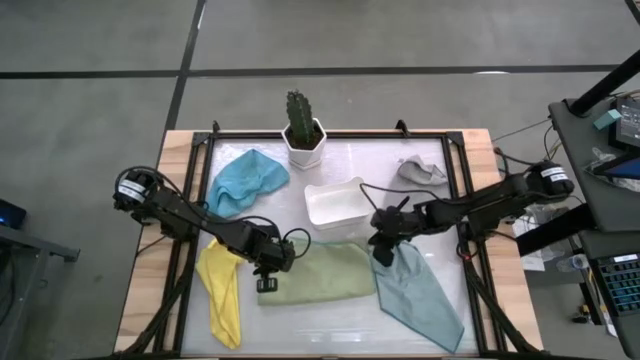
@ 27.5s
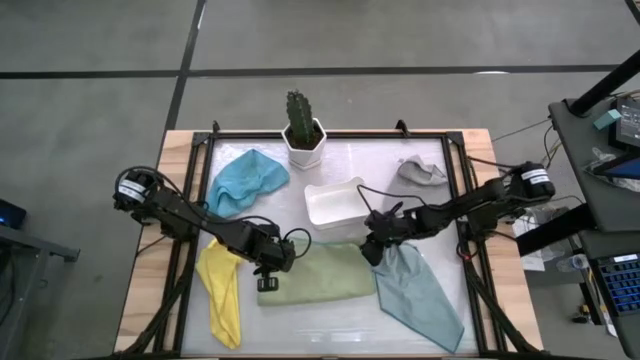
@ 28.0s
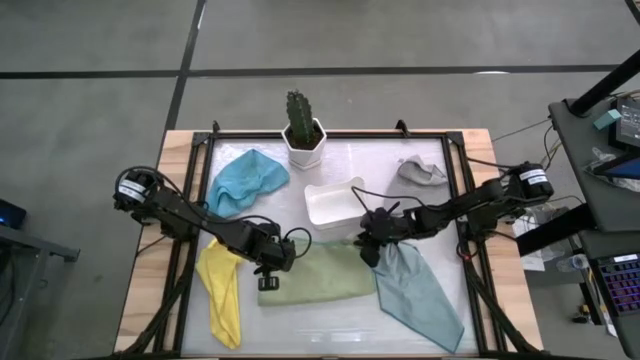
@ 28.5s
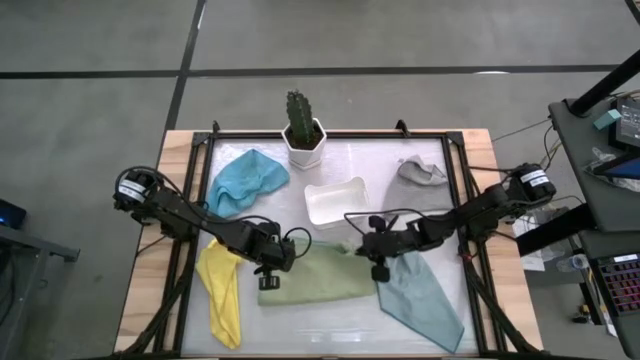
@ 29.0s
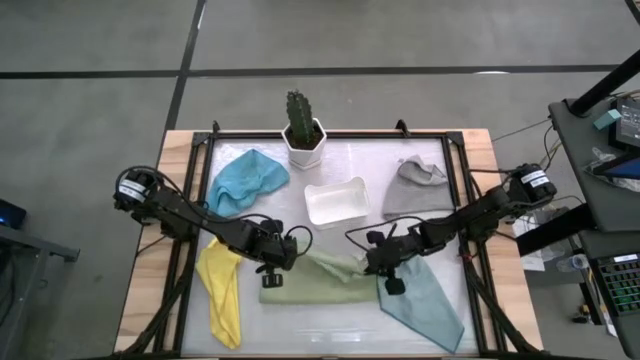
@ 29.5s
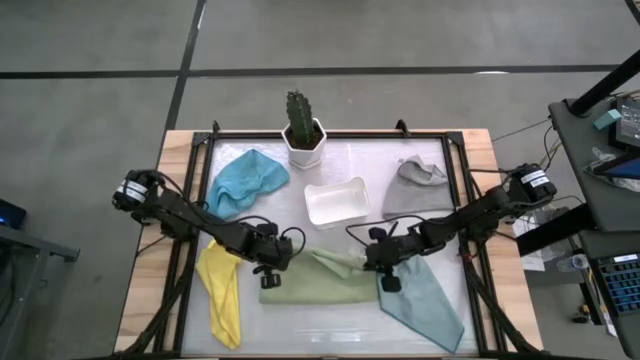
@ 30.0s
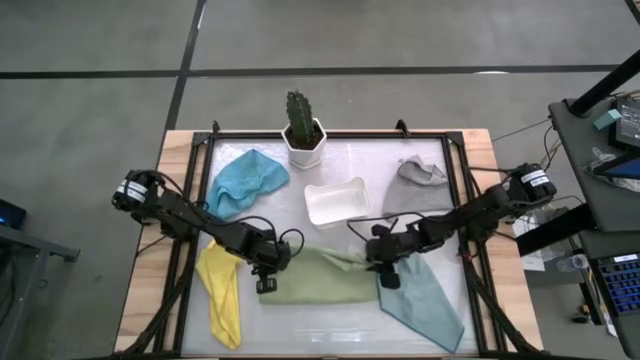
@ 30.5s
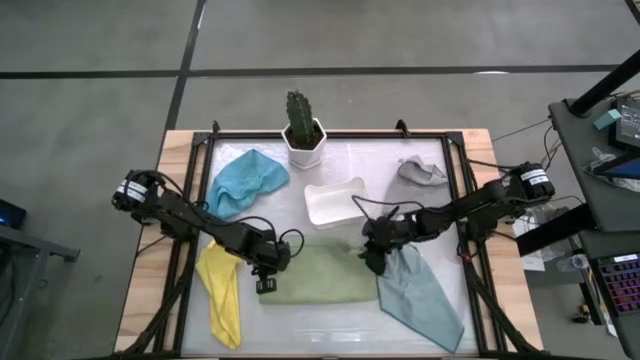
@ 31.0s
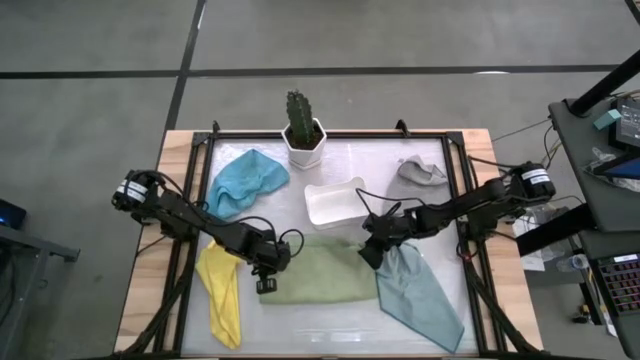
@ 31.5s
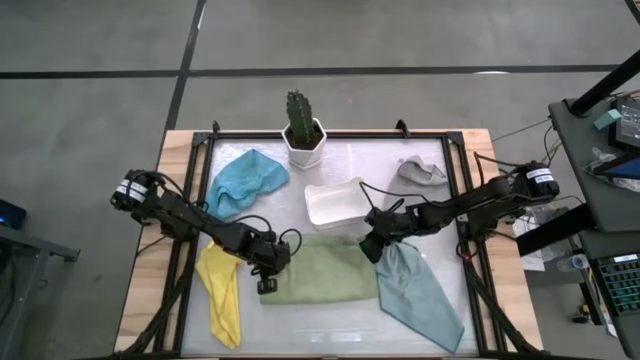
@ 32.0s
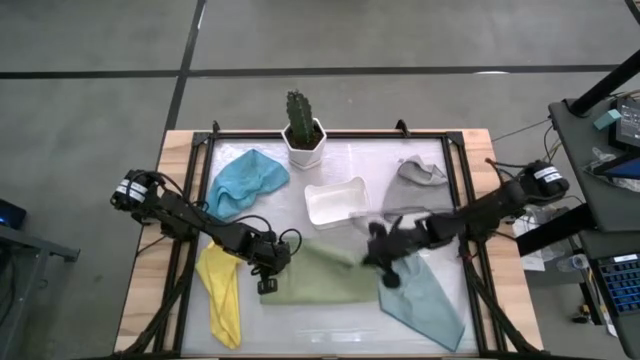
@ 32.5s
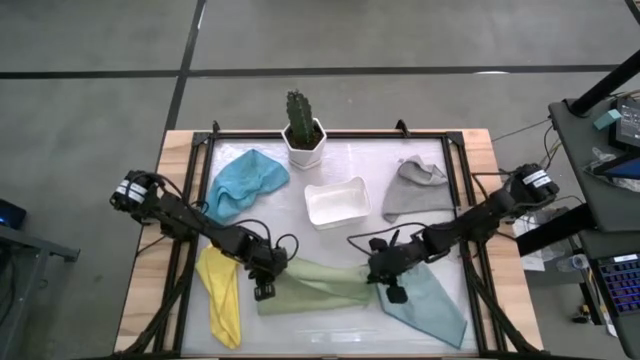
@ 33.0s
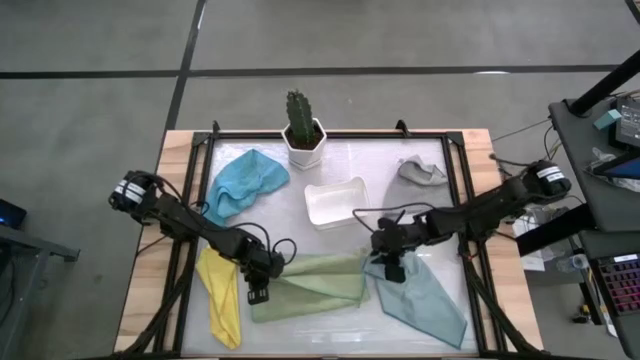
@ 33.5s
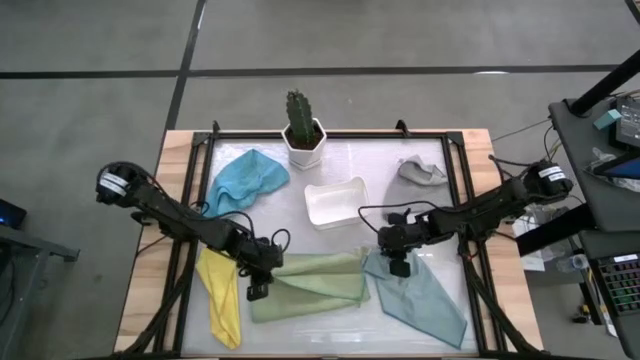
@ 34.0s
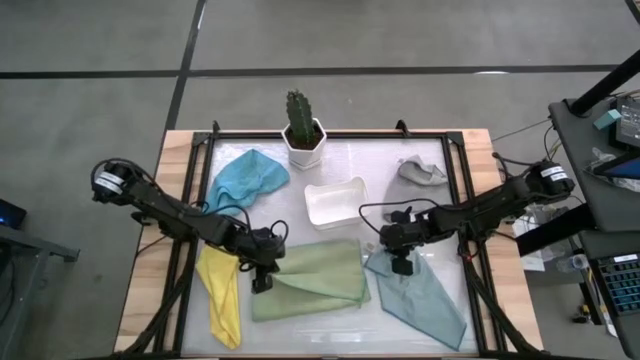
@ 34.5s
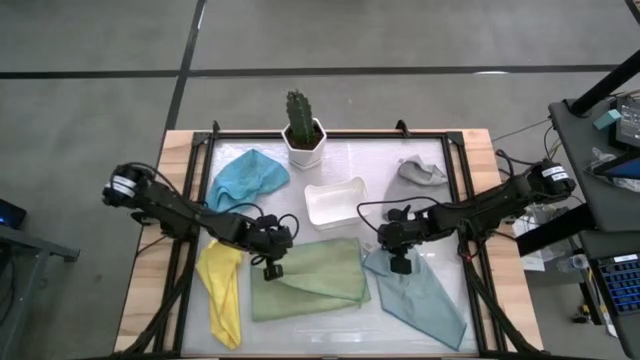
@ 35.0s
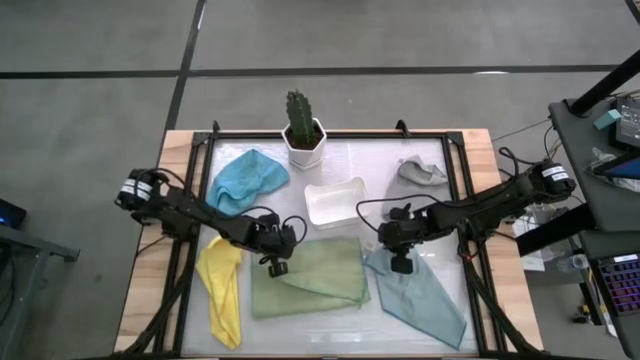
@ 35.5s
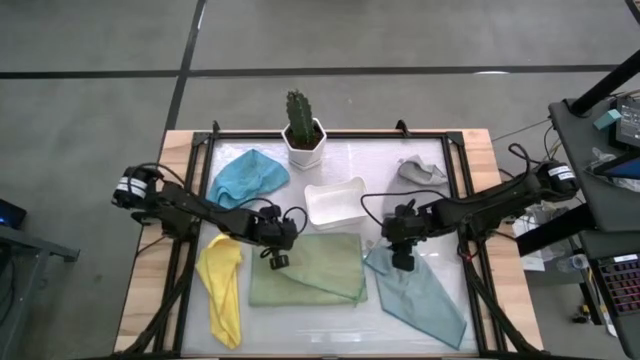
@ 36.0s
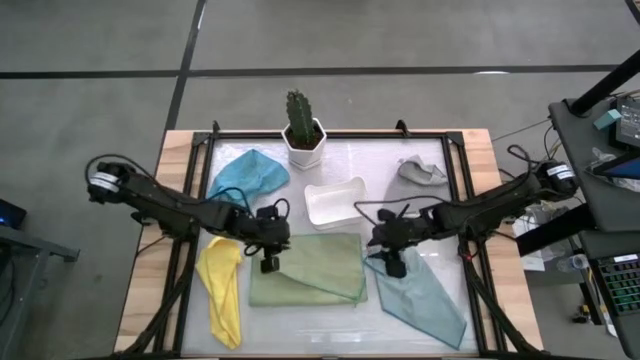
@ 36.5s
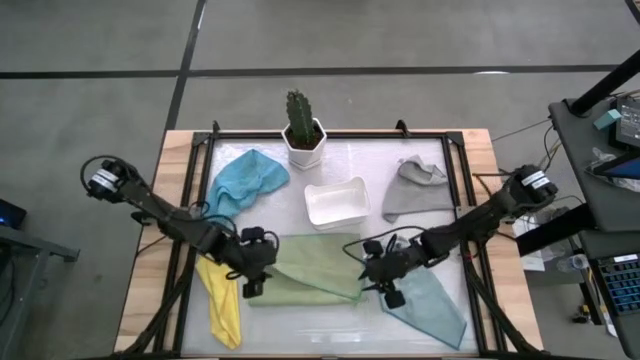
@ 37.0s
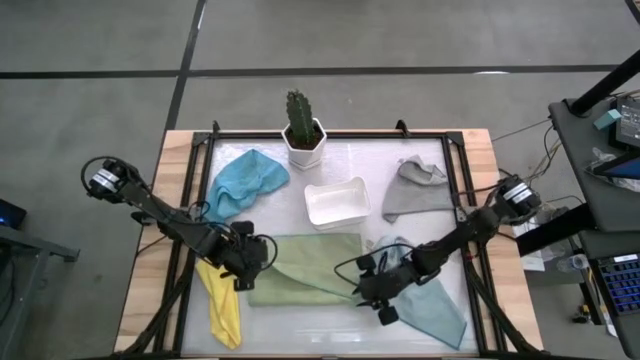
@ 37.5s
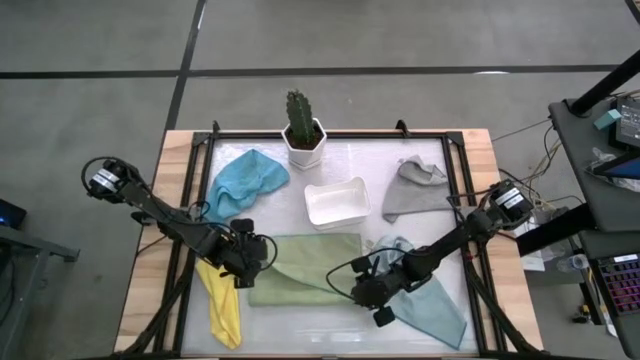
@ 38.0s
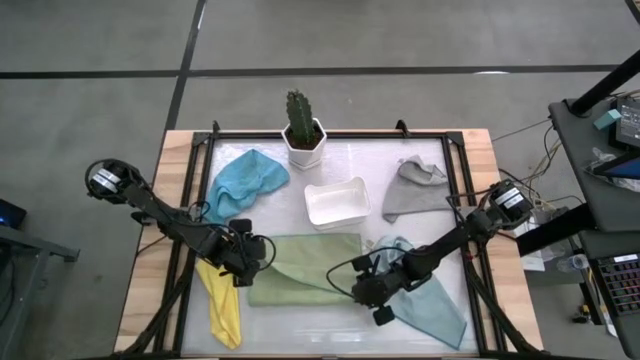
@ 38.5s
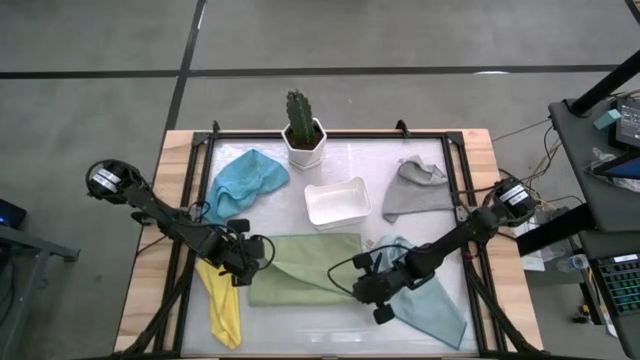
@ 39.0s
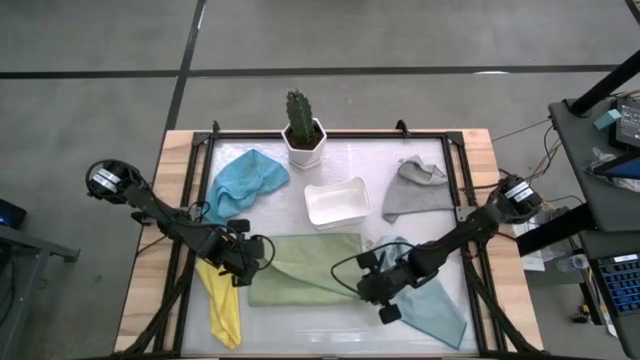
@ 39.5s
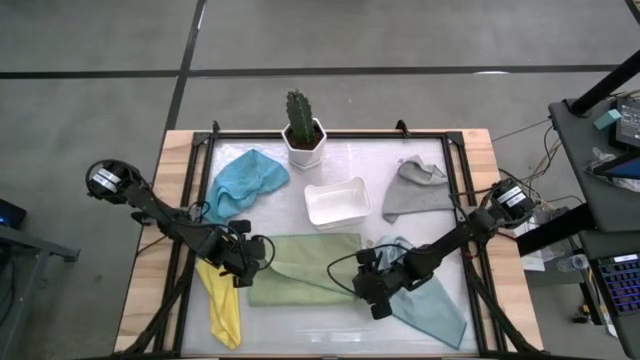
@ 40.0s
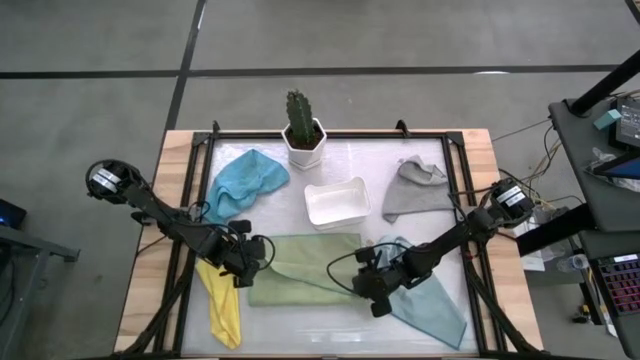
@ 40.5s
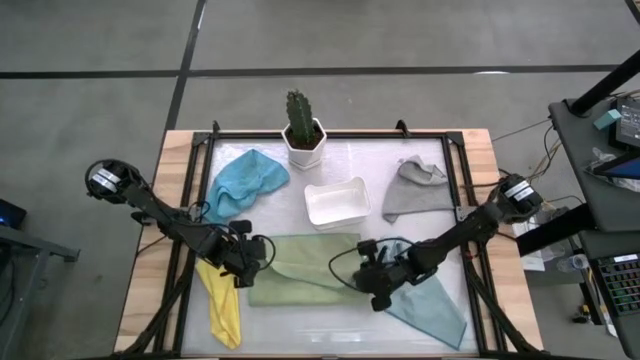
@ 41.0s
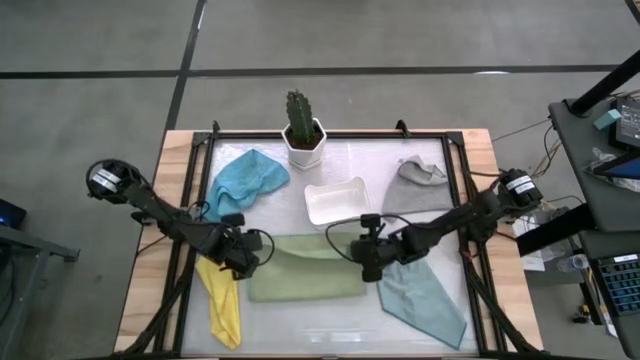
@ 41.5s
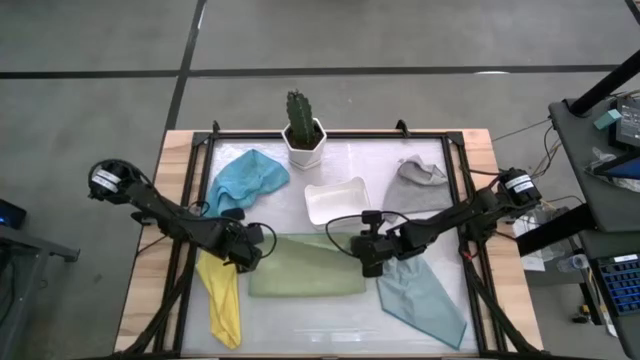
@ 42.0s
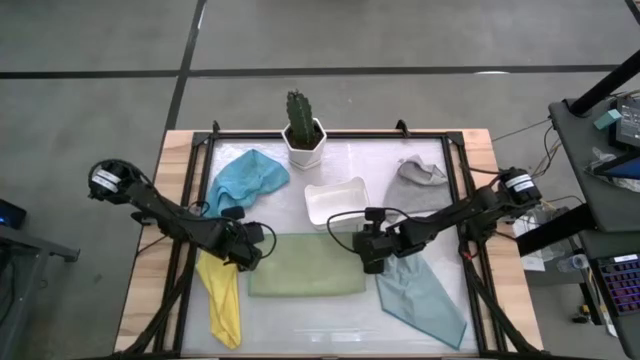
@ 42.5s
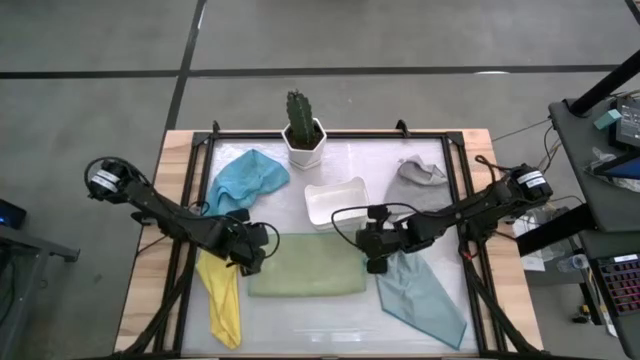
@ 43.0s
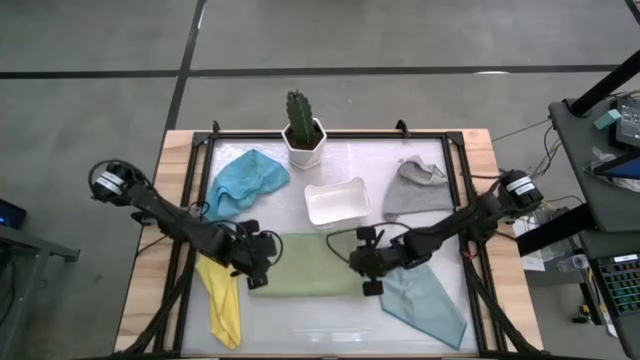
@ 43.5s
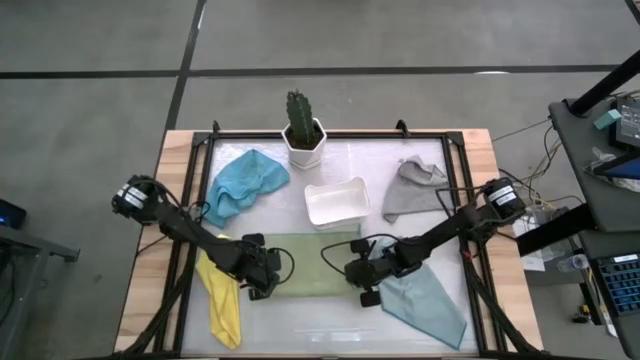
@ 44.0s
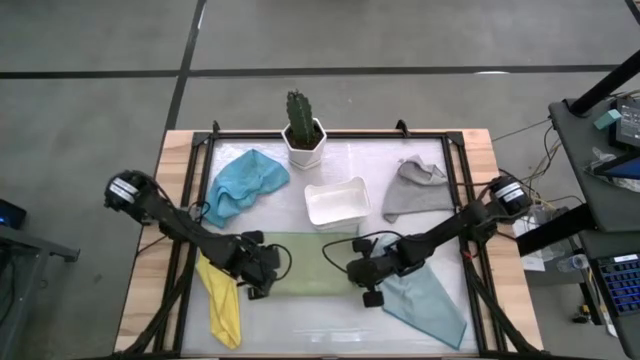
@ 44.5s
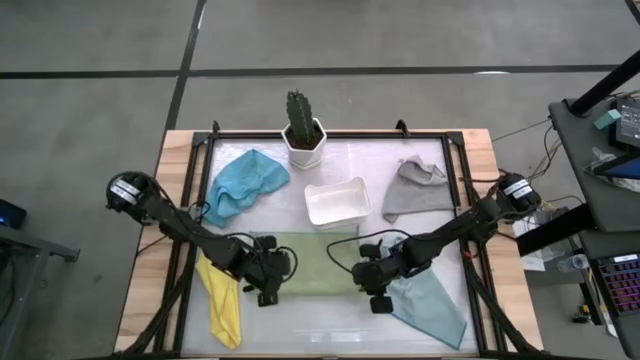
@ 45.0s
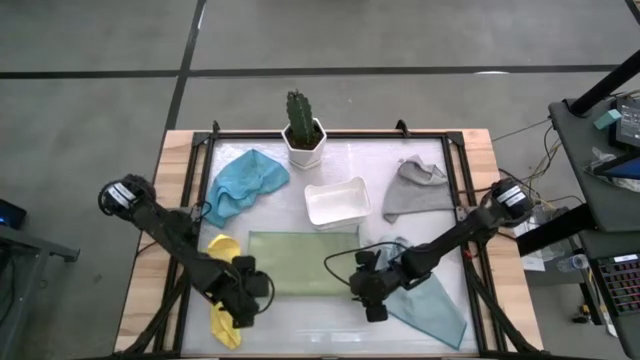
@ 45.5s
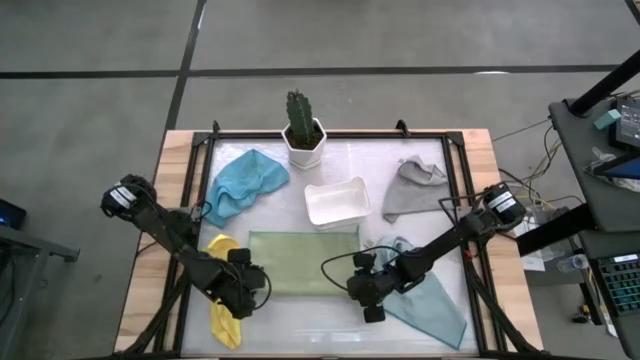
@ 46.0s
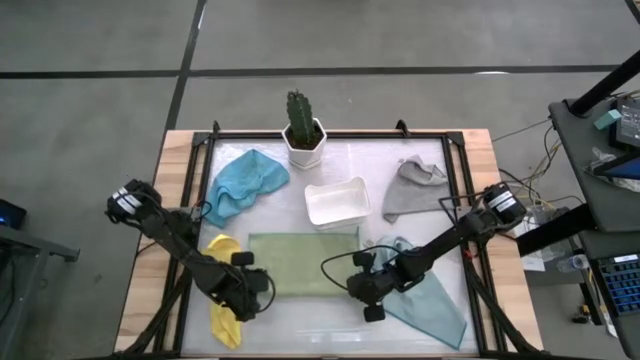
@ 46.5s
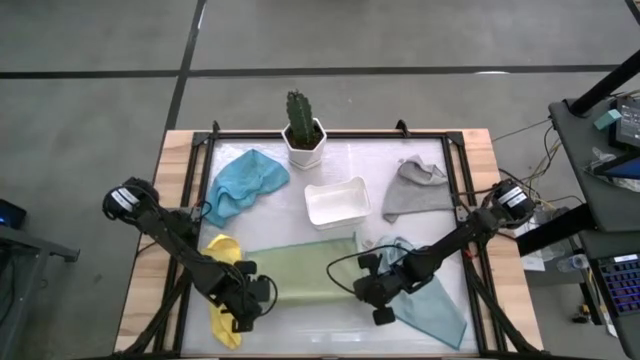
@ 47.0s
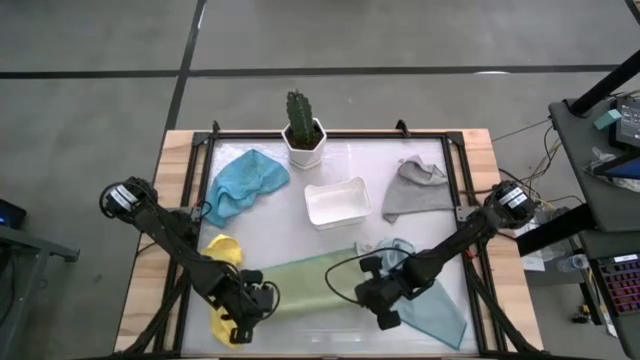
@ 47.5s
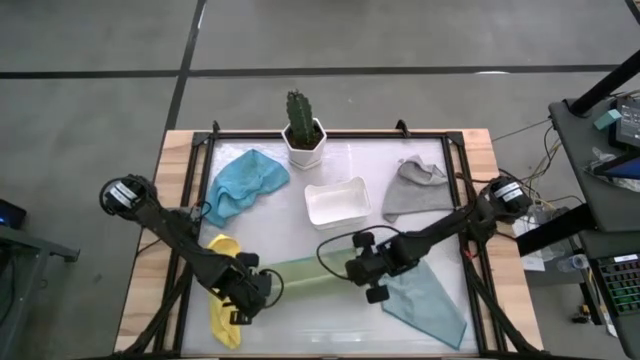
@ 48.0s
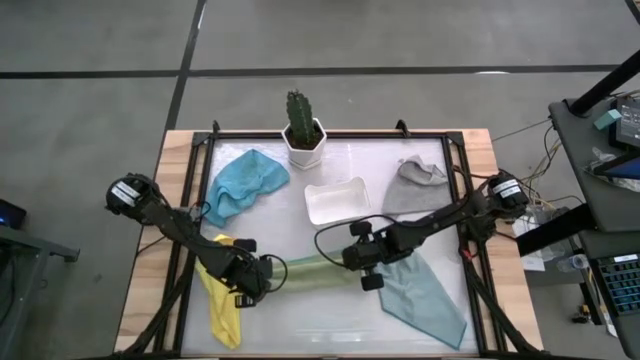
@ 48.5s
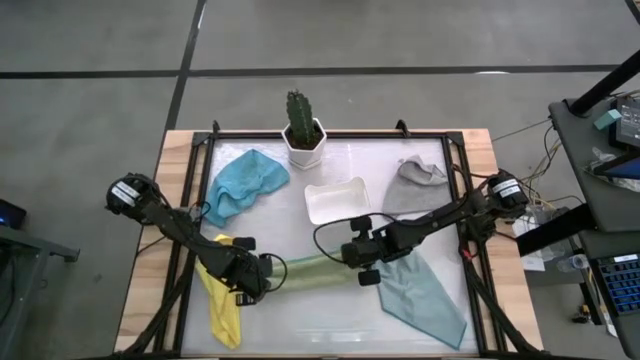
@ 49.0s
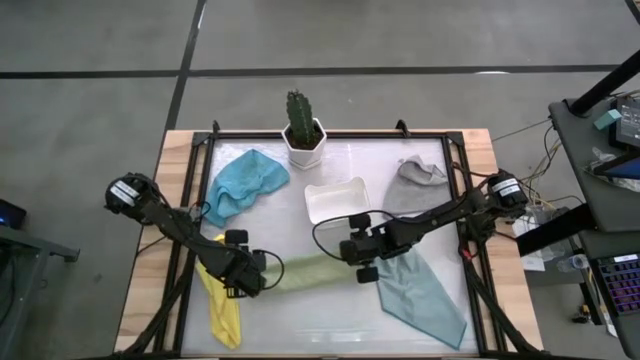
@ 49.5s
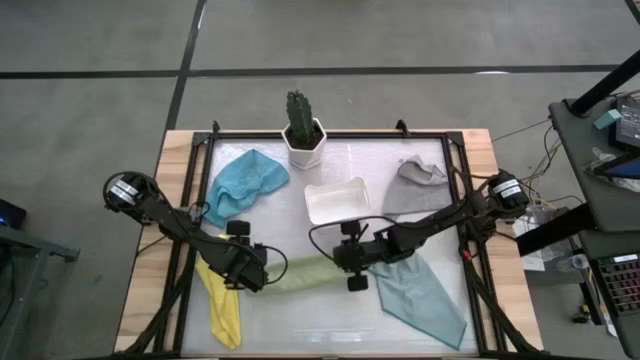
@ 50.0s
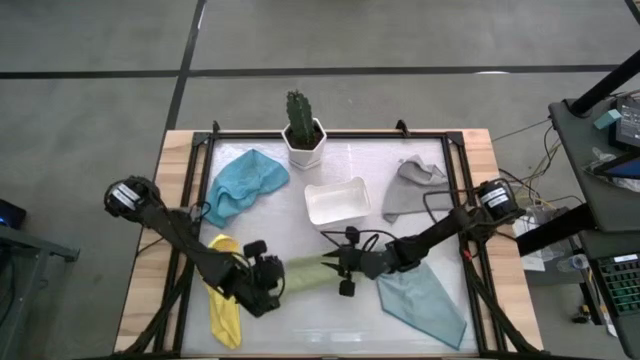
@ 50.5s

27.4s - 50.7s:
Task: Fold microfiber towels
Fold the green towel
